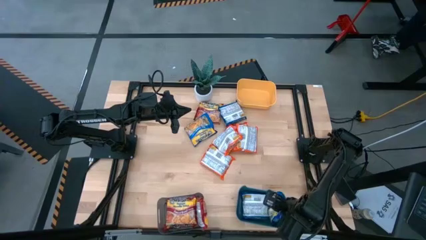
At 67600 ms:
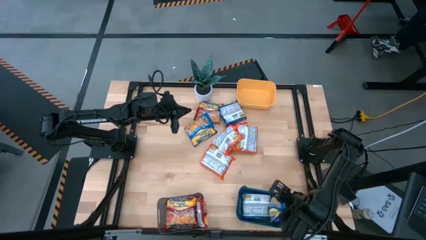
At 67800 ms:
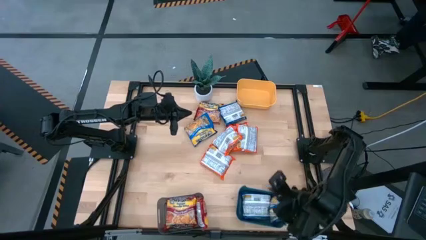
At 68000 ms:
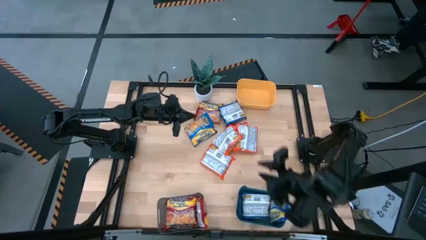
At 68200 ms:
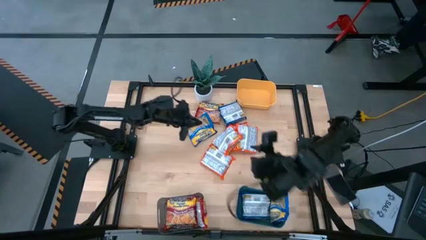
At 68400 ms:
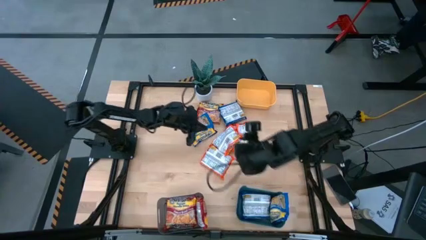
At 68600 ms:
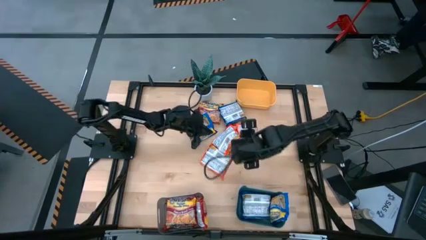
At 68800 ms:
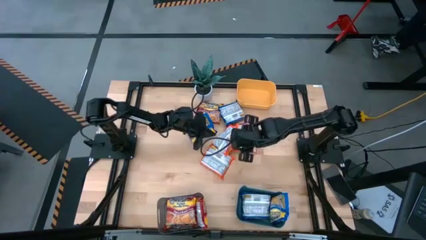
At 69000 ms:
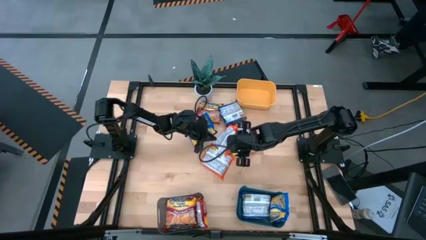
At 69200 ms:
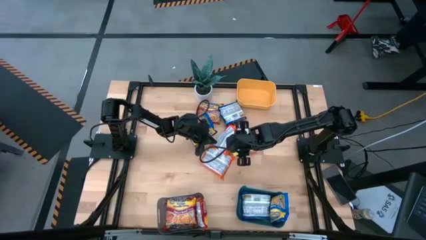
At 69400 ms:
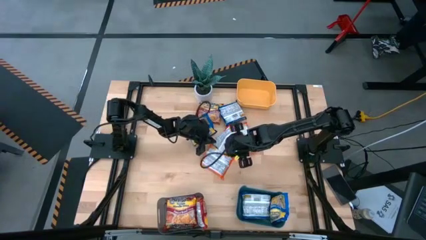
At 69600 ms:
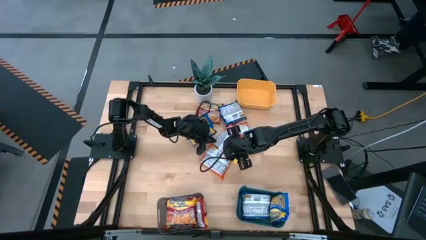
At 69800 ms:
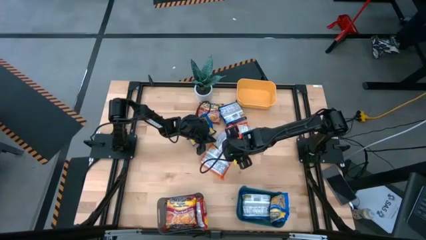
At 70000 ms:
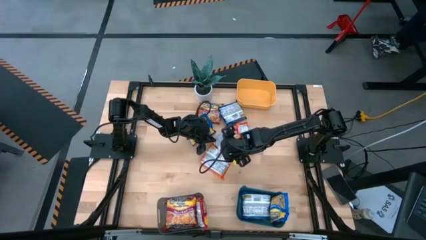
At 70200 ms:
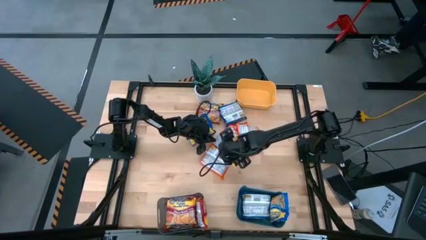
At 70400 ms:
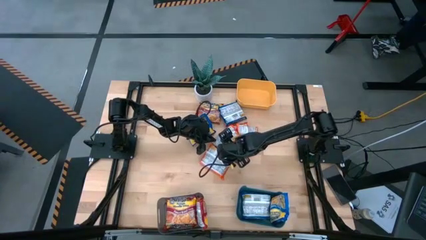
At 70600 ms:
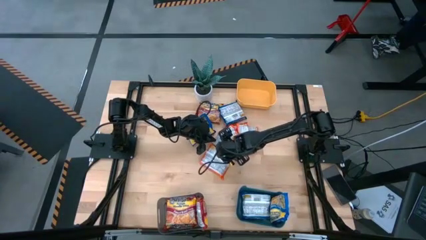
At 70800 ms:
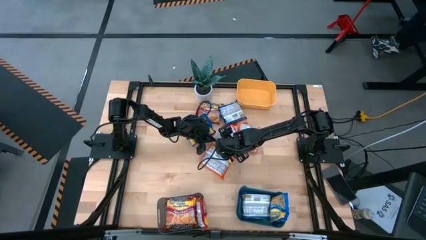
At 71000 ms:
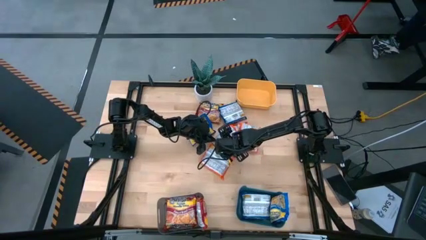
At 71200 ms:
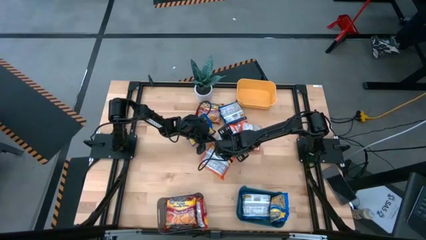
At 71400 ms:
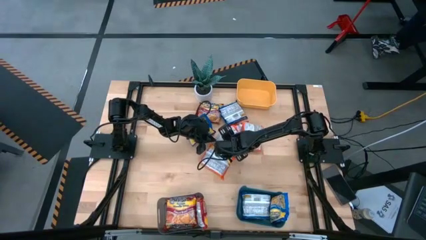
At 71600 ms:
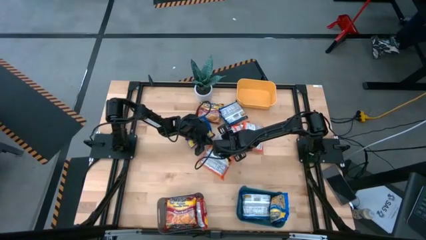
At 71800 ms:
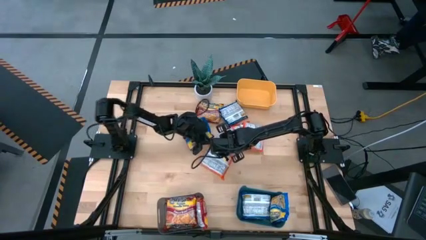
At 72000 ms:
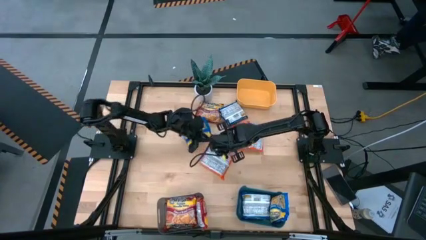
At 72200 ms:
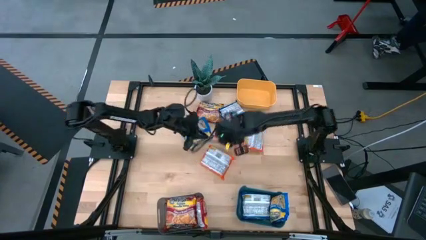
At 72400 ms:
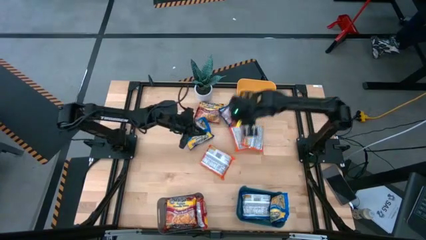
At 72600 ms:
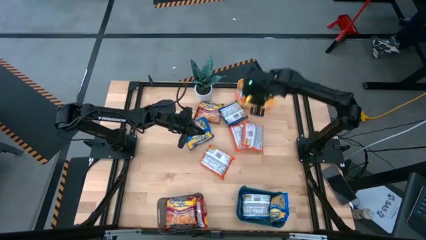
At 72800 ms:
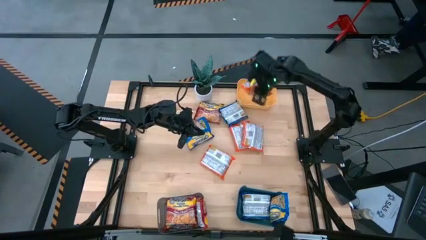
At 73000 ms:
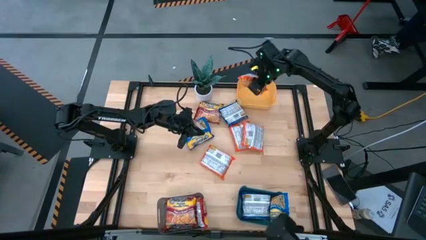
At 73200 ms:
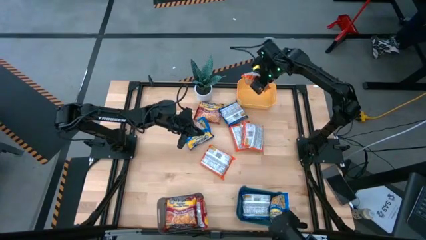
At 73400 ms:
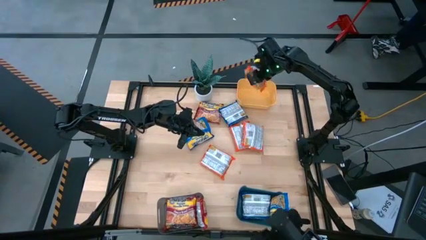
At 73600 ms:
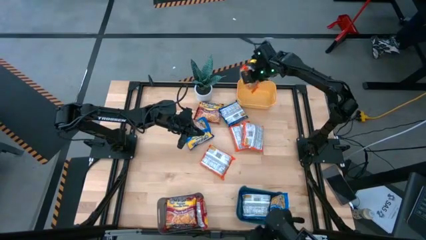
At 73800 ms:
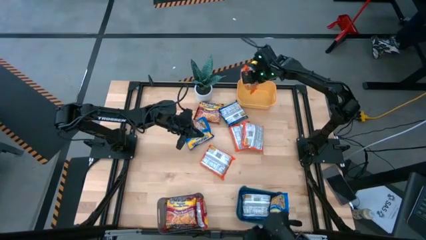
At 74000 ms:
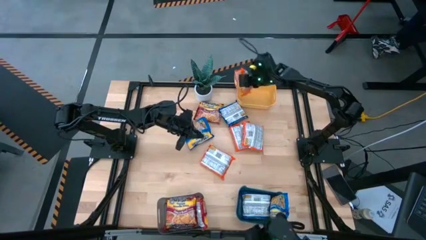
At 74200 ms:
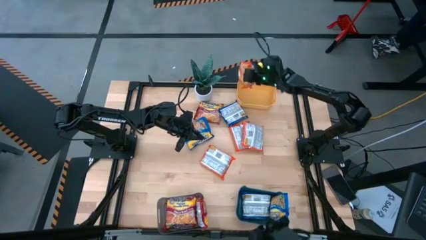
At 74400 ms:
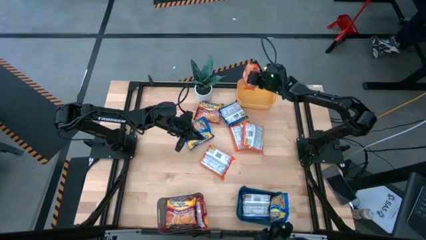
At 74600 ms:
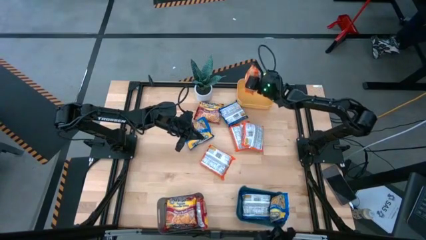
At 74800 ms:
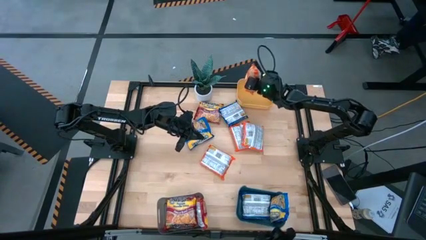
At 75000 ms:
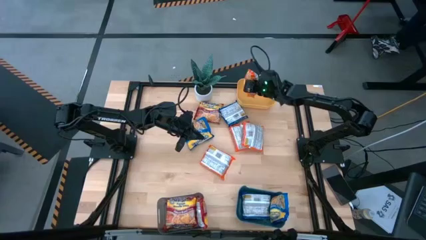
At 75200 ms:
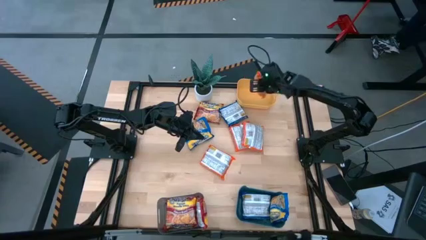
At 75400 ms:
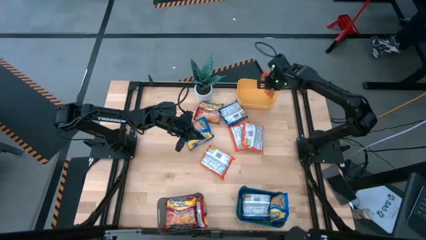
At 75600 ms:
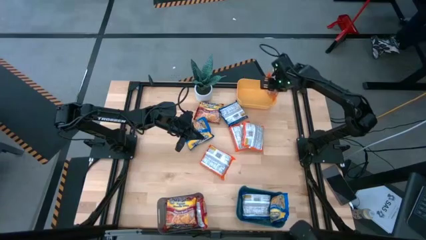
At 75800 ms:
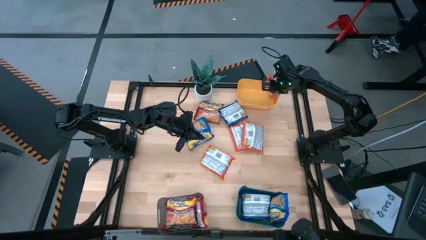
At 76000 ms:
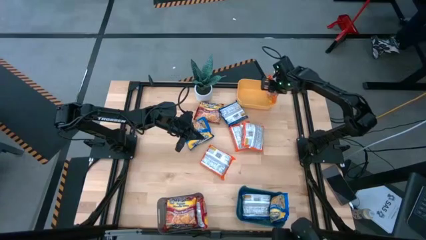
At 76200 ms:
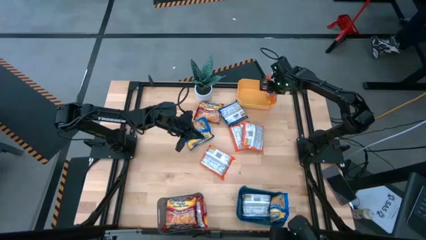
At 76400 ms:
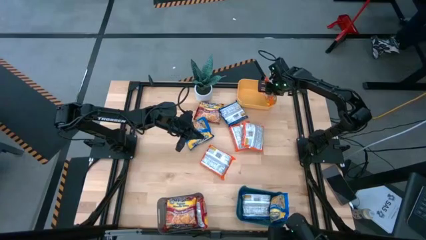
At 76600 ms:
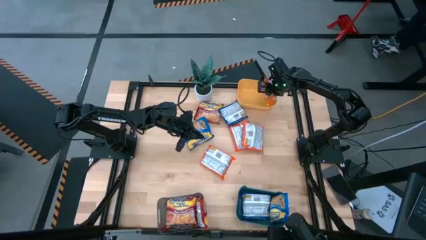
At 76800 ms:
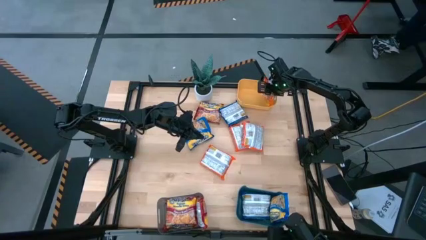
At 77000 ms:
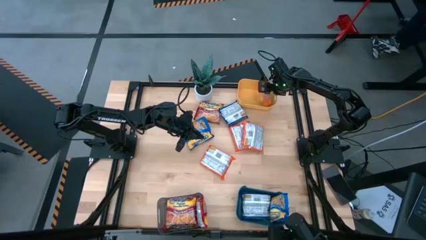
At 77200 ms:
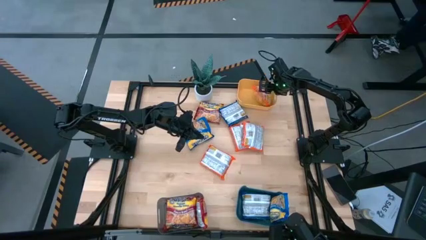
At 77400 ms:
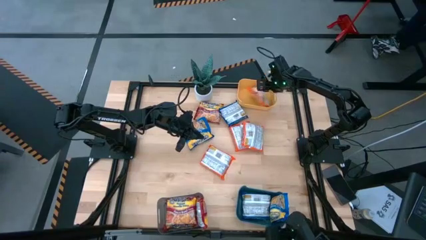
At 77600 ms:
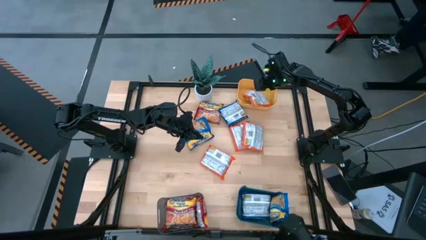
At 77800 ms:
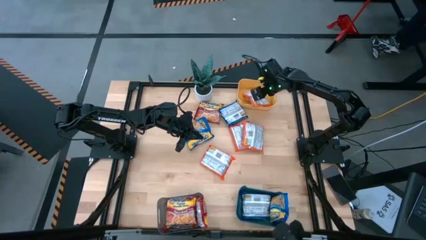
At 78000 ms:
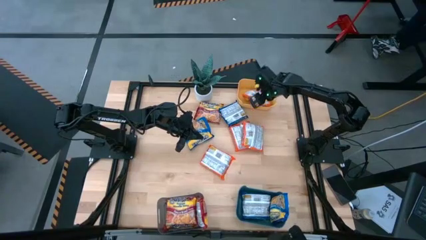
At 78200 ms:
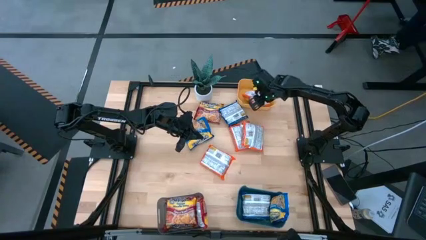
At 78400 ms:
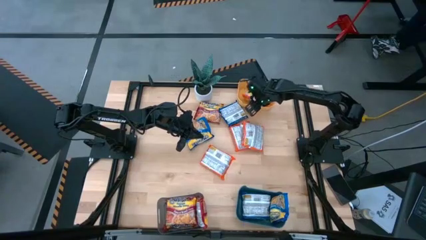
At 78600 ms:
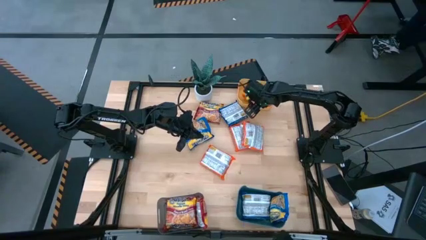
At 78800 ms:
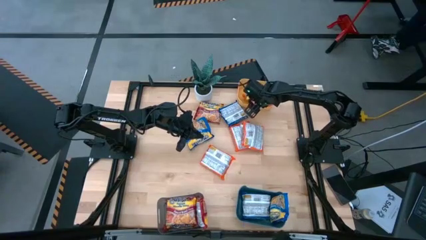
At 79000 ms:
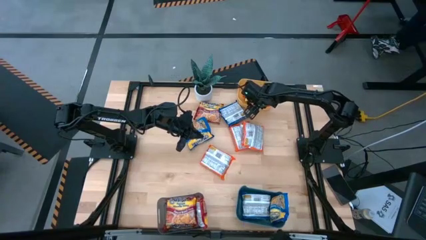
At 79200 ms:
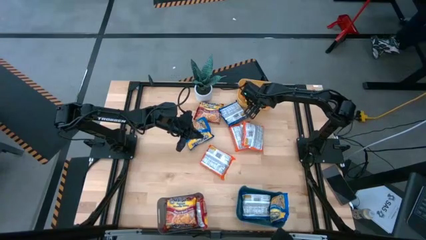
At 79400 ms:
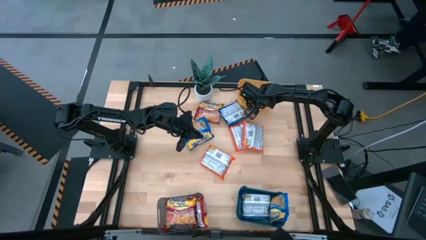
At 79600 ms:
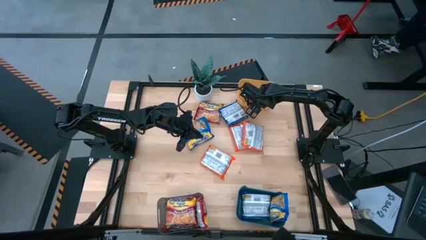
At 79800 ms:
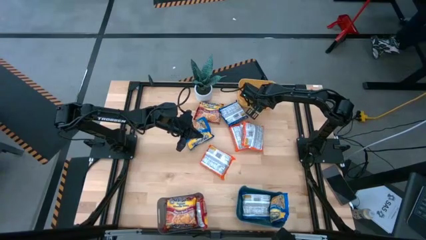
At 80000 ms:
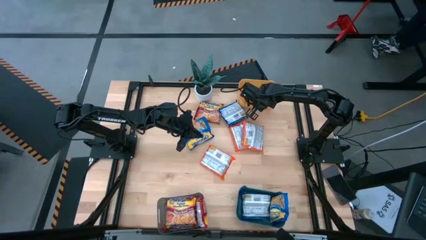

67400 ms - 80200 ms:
Task: Sort Maruchan noodles
Put the orange noodle pack into the yellow bin

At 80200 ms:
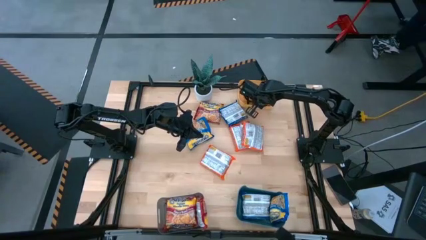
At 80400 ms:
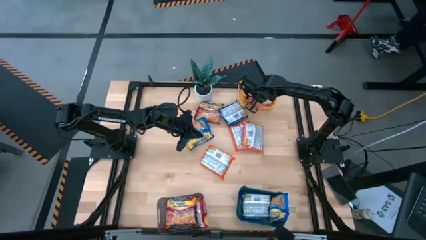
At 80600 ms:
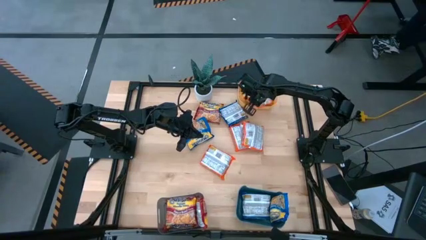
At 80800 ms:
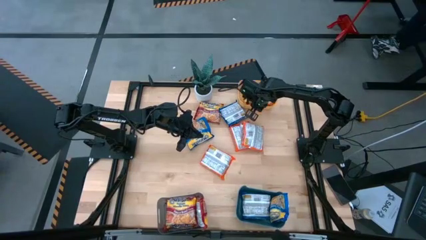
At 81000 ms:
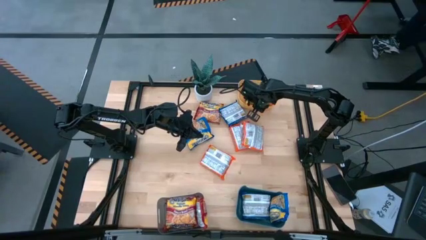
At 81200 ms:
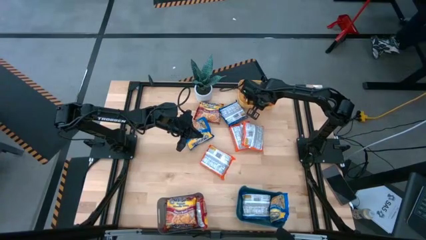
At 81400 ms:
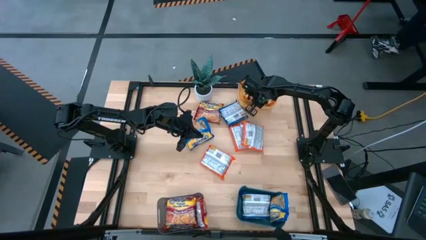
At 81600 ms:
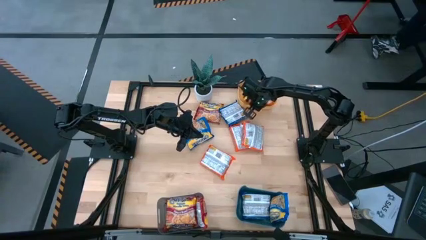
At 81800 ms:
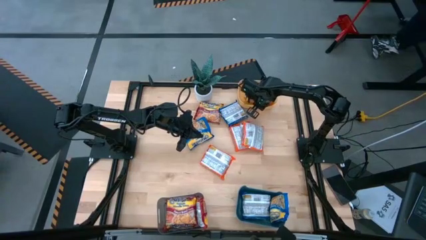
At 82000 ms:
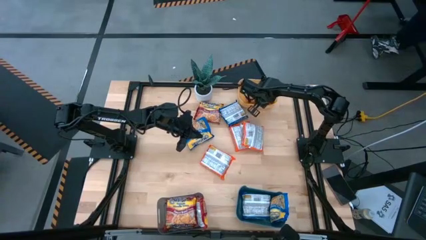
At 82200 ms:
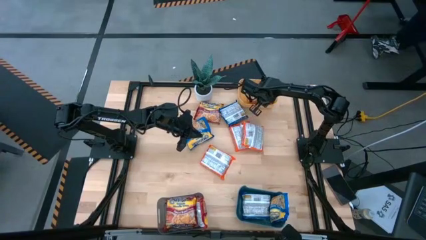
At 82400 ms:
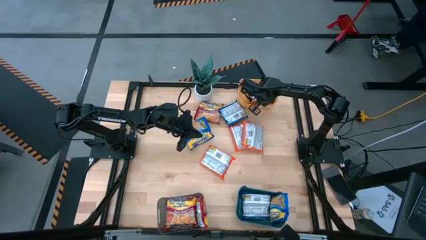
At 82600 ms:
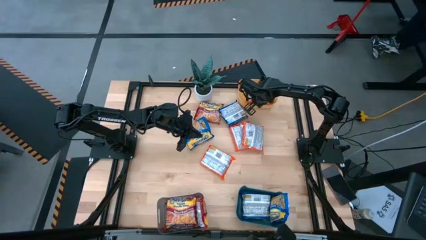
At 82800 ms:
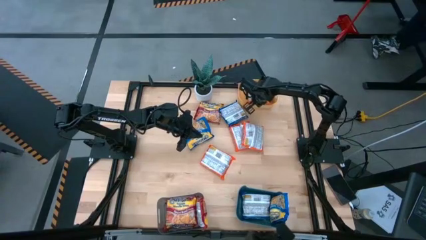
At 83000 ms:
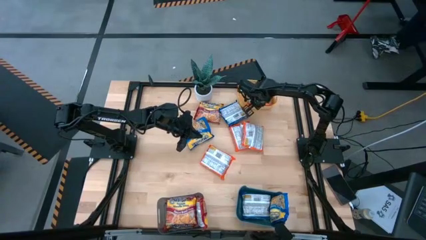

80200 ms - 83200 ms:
Put the orange noodle pack into the yellow bin
